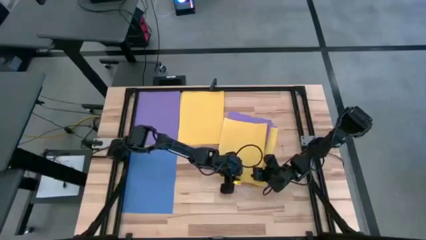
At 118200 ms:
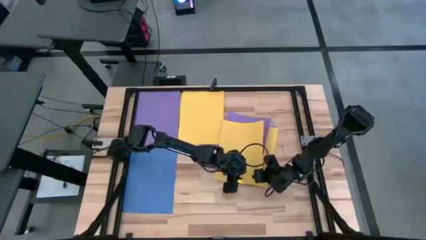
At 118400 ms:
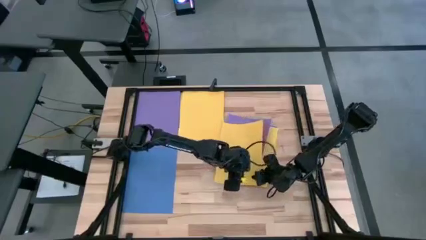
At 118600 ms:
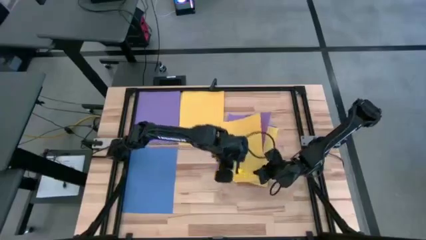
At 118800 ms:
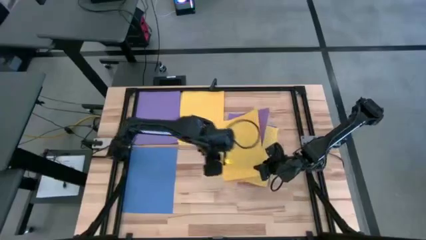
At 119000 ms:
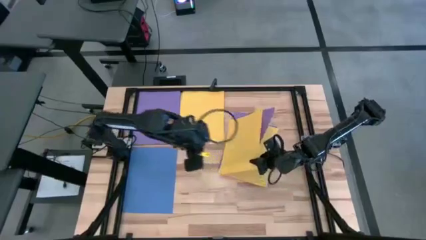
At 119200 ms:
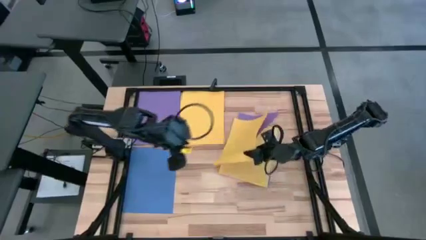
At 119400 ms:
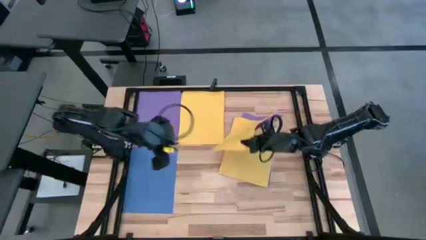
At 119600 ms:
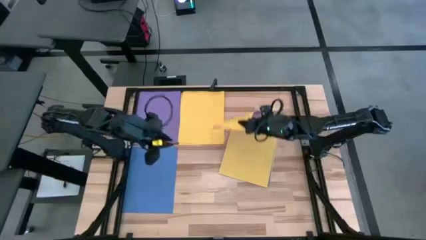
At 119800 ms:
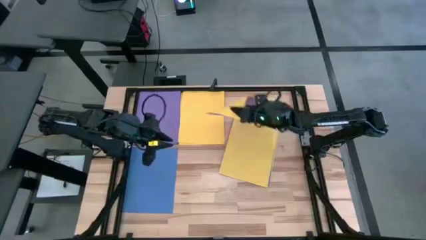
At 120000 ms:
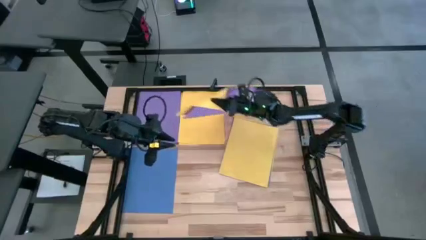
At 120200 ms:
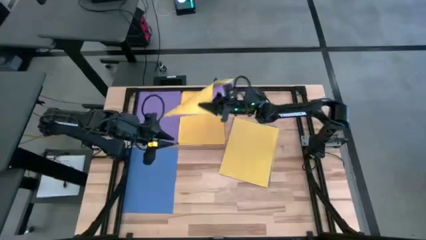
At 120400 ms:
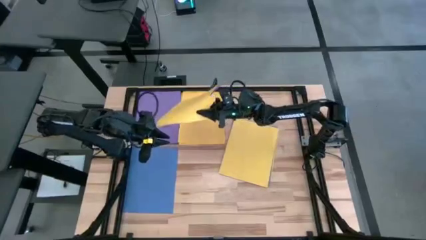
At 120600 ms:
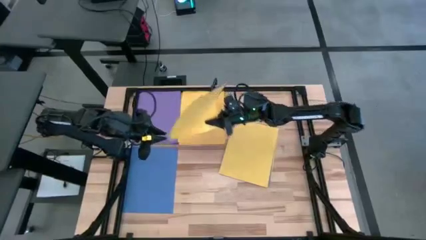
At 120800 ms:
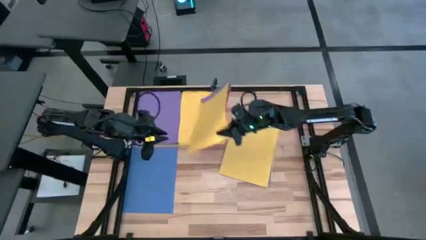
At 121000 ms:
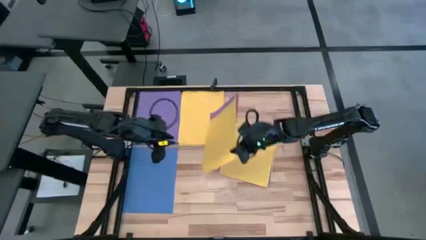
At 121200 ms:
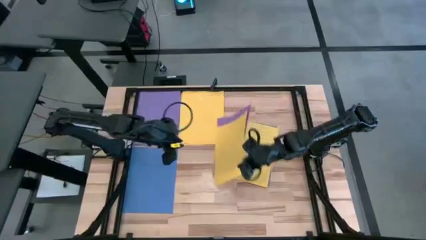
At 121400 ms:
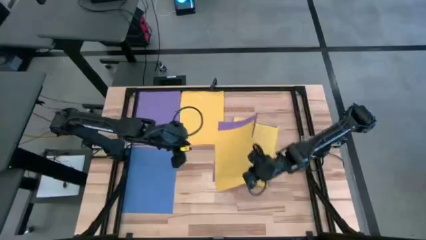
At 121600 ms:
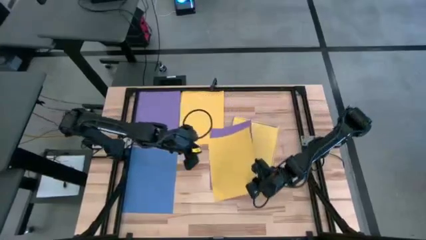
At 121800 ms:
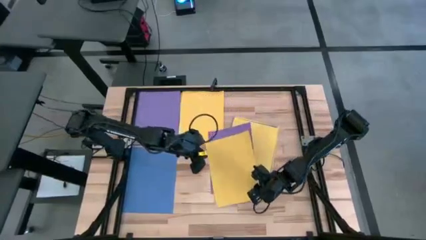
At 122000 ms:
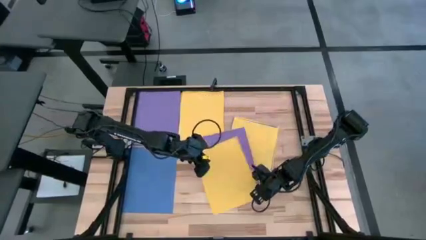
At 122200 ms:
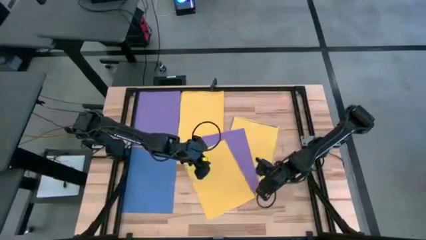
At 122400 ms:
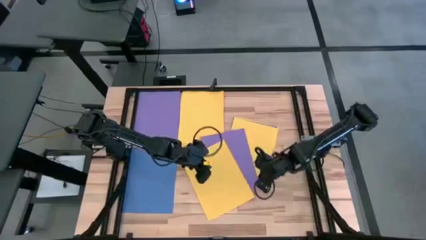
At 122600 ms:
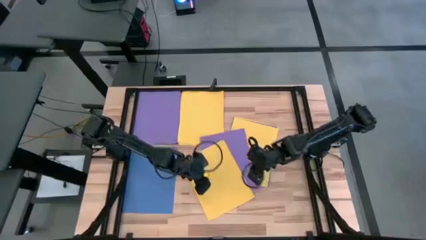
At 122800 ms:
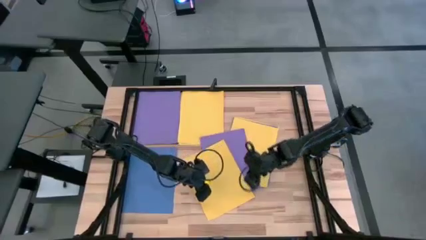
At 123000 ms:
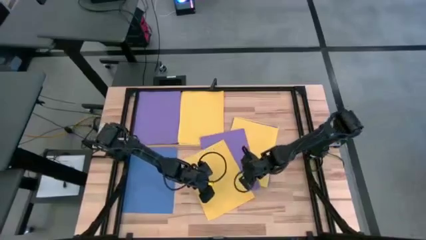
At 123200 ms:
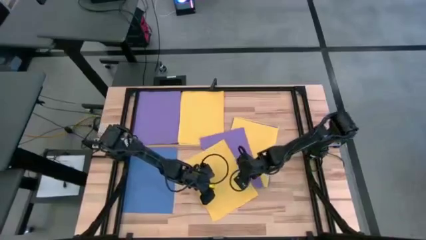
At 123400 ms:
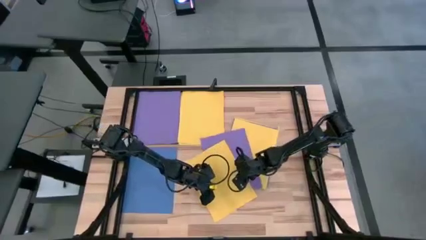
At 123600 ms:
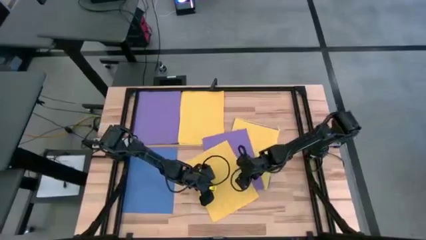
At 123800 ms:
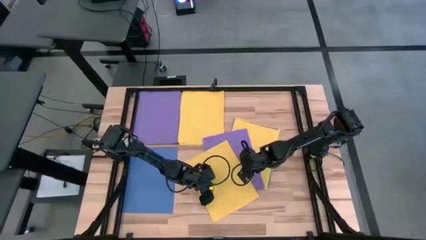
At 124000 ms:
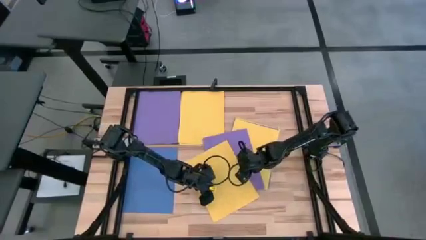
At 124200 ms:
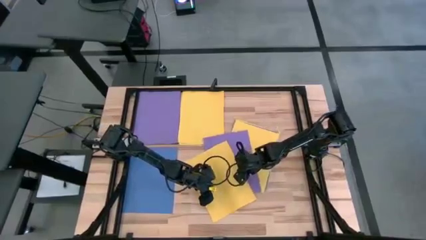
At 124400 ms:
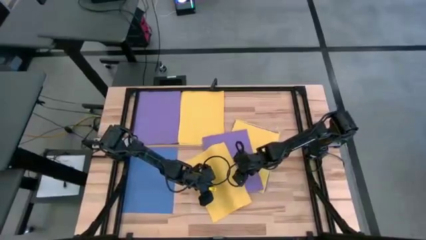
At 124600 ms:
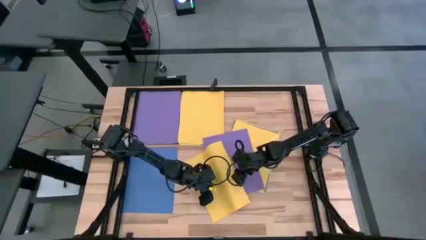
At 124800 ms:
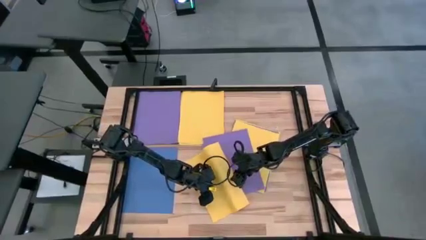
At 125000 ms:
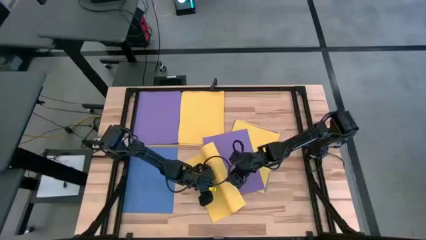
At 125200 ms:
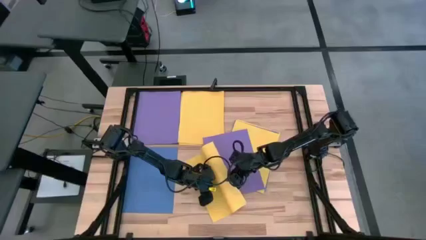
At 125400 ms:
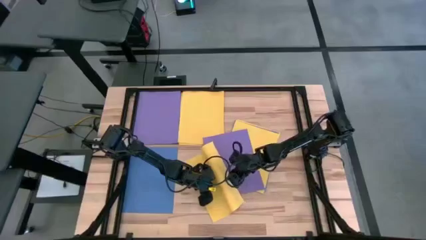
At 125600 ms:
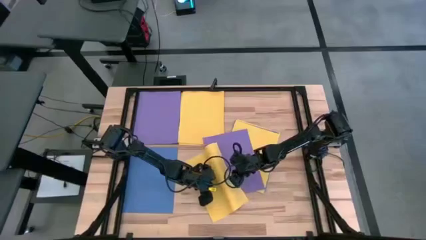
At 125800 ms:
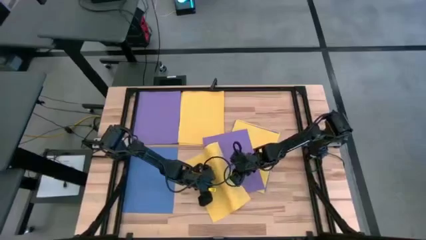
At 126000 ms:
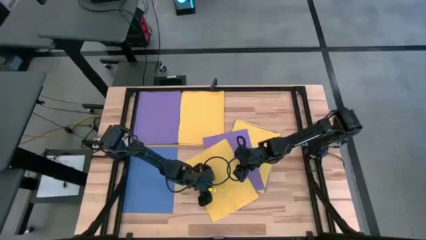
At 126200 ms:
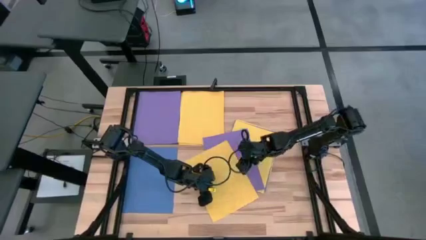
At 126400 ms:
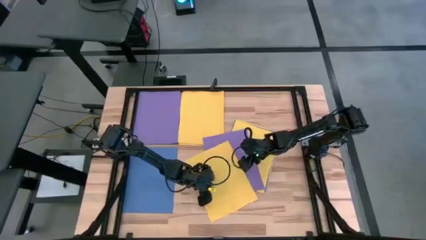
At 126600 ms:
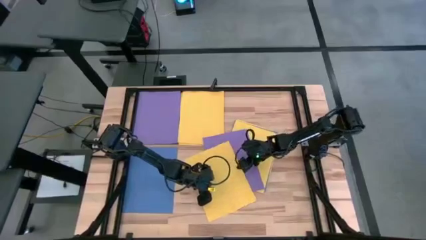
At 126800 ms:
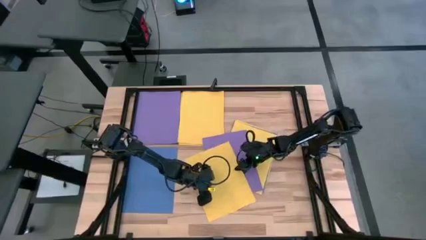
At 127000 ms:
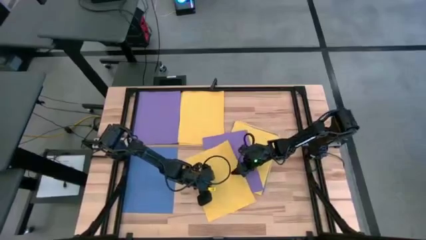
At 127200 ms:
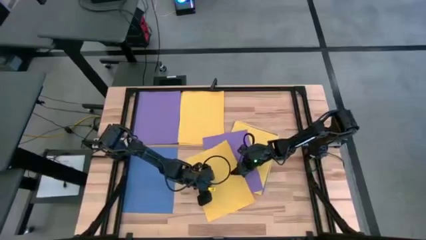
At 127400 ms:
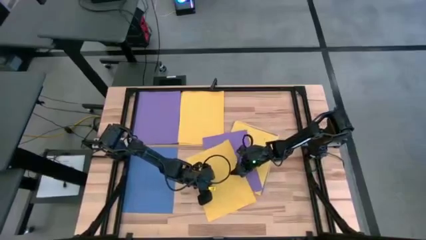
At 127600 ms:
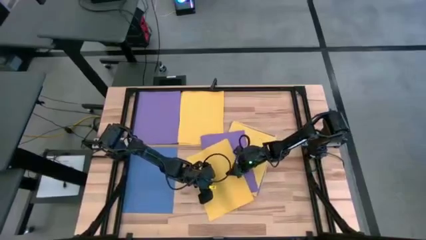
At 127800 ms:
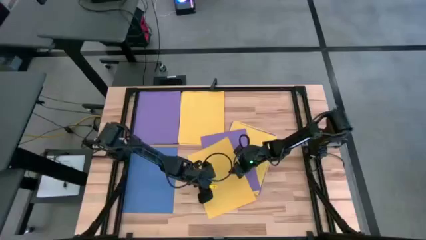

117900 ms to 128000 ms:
Task: Organize paper
Stack the yellow paper on top of the yellow paper

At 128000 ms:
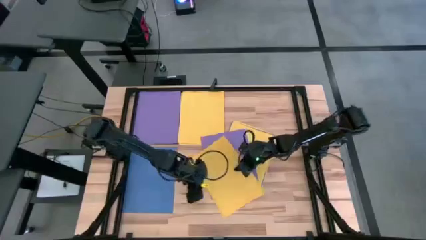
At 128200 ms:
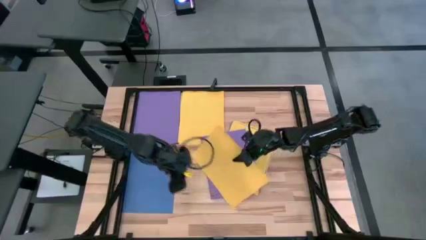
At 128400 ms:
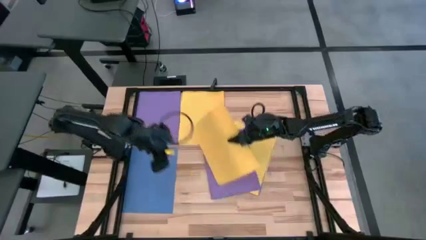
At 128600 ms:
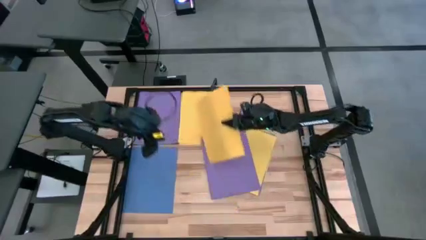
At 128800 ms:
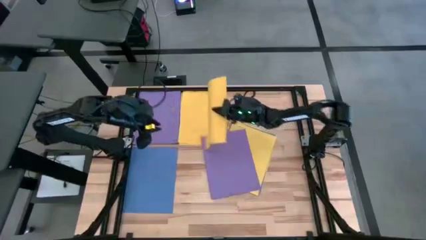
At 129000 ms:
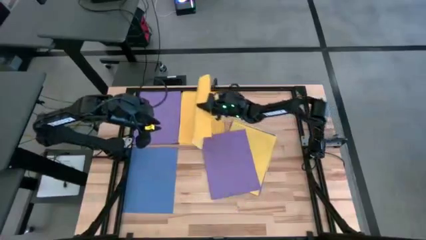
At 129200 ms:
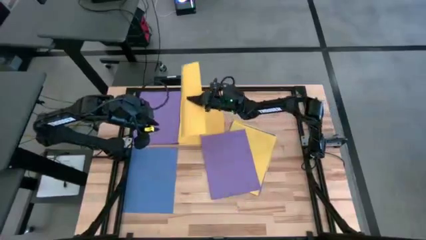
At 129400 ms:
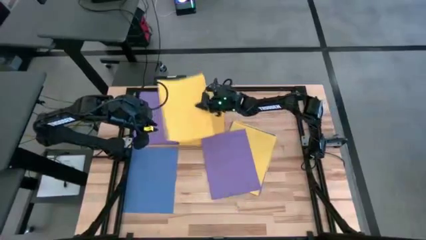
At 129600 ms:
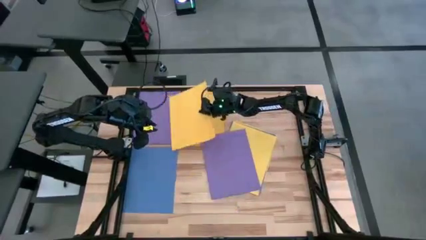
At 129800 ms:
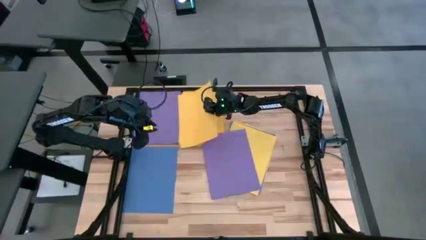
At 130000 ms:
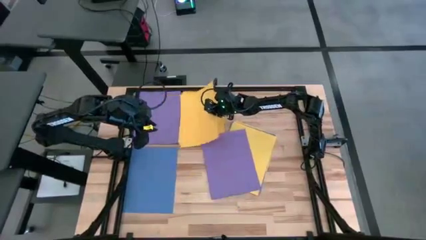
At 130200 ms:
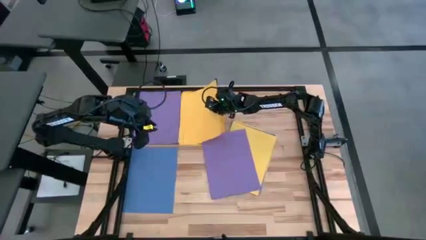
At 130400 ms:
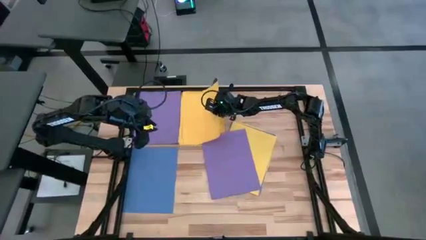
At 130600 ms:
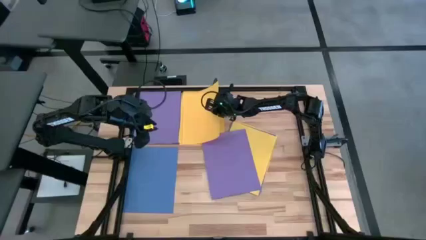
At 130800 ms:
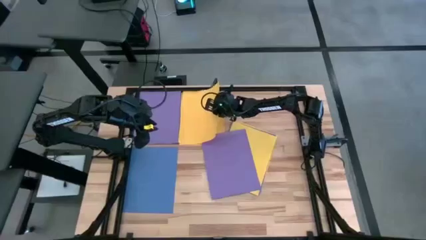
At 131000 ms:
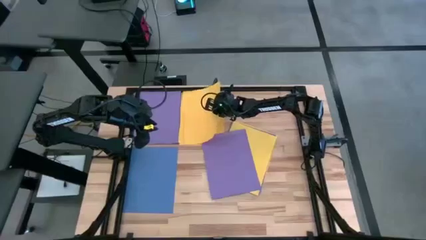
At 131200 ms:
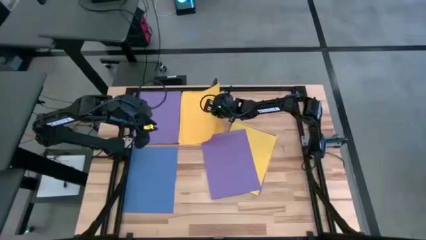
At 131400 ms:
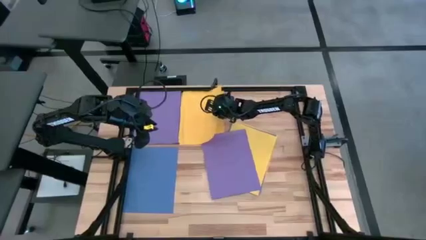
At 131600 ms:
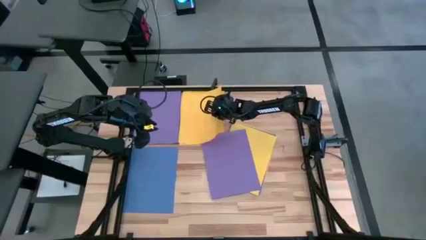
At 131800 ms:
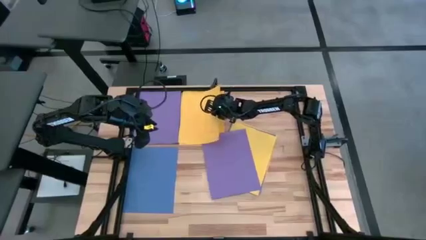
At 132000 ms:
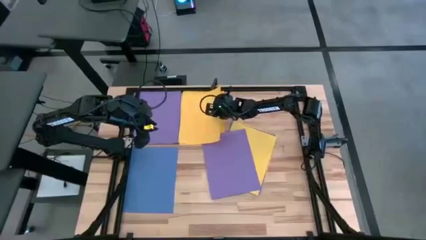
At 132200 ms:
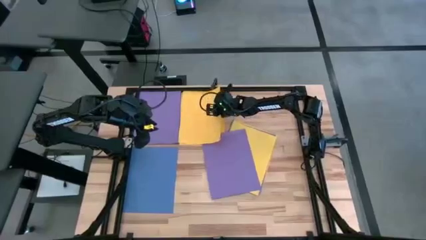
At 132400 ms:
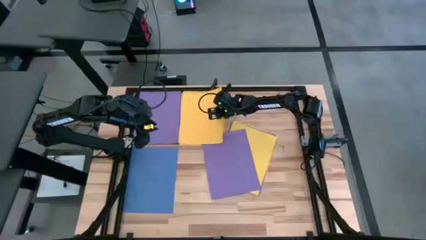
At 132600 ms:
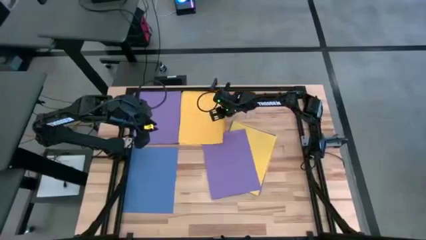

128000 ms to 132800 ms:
Stack the yellow paper on top of the yellow paper

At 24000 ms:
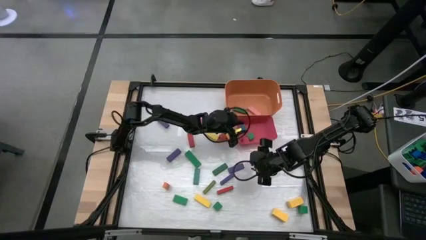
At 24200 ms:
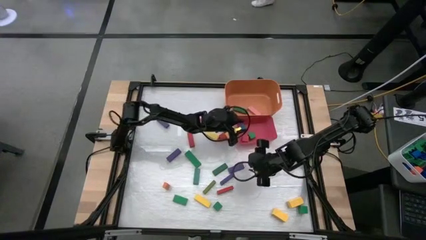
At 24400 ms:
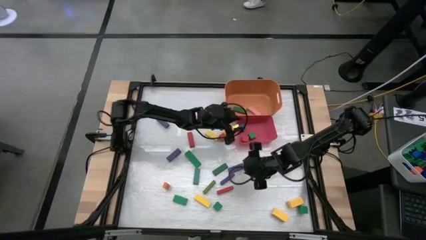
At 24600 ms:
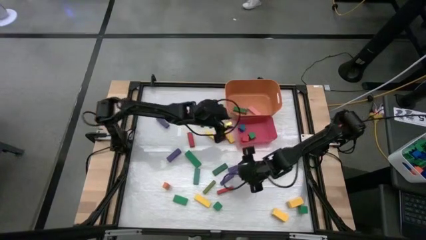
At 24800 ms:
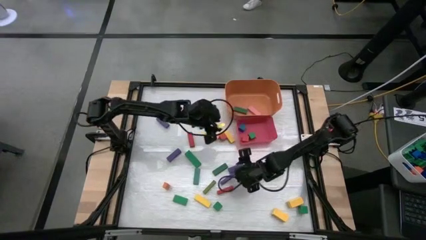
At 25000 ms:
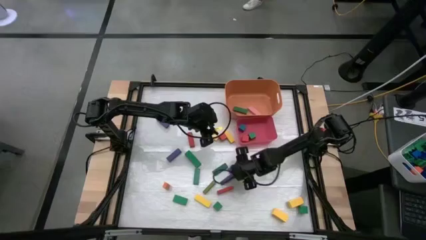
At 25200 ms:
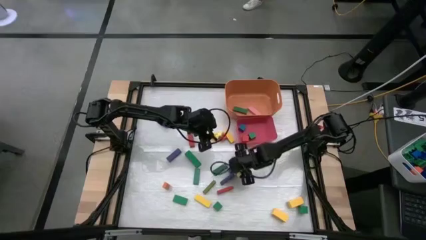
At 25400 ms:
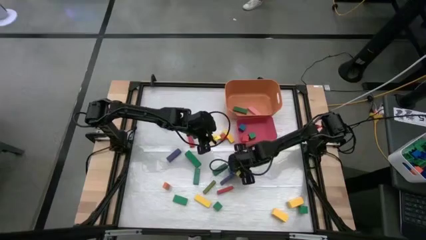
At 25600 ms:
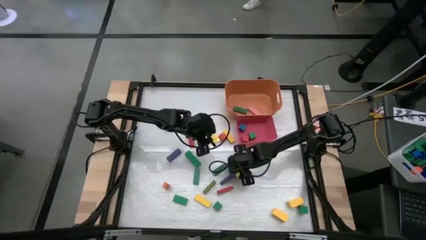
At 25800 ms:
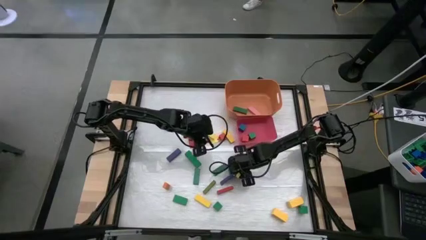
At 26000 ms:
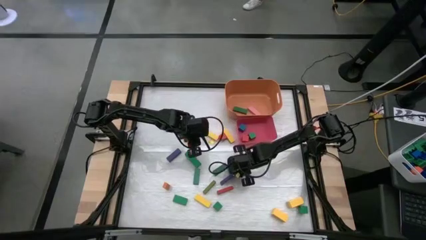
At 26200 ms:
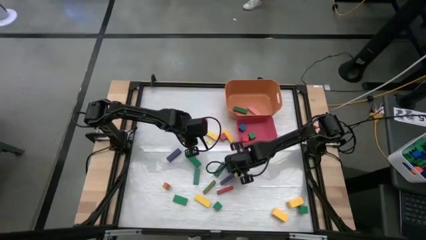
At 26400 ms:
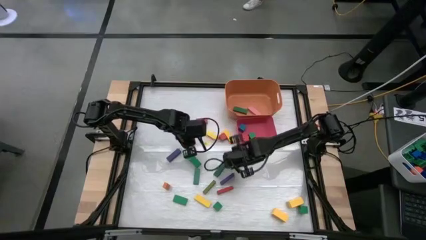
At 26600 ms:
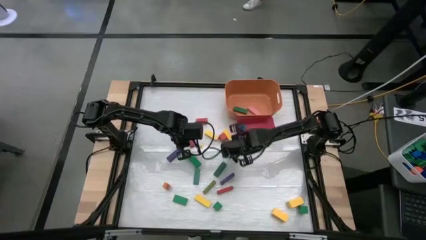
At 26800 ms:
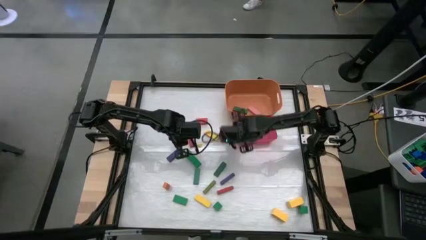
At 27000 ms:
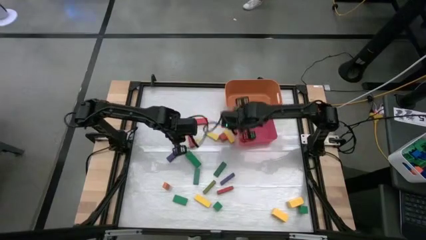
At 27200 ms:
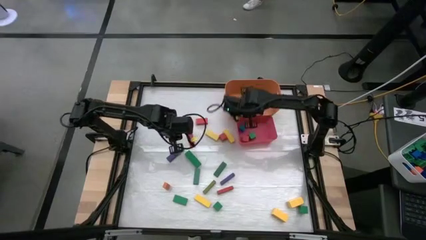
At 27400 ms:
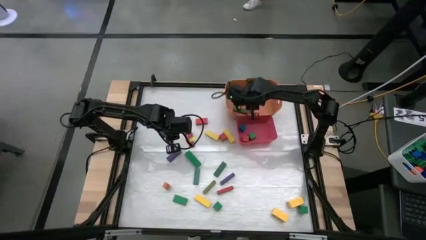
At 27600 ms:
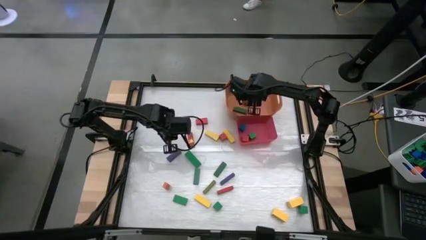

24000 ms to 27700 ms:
Task: Sort blocks by size
Put the violet rectangle block into the orange bin
